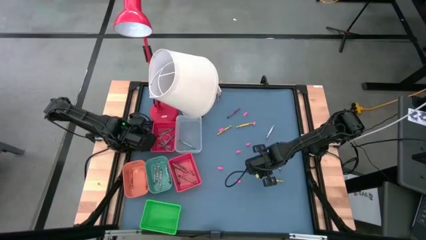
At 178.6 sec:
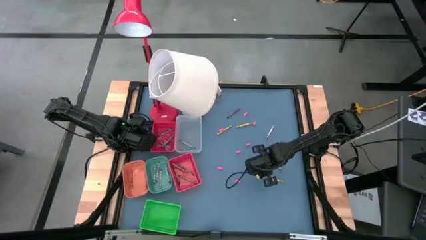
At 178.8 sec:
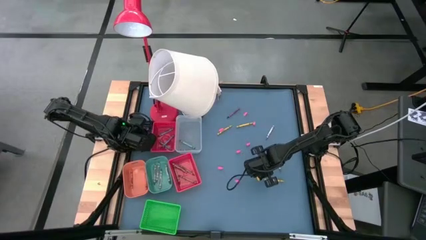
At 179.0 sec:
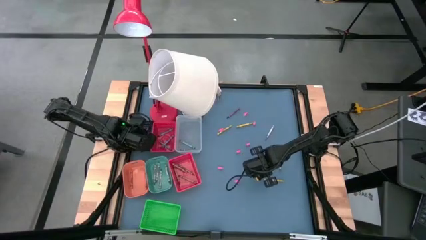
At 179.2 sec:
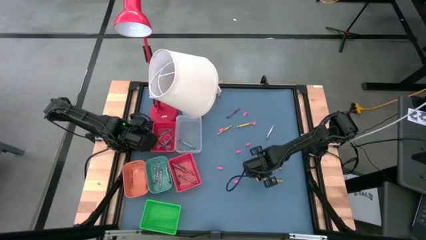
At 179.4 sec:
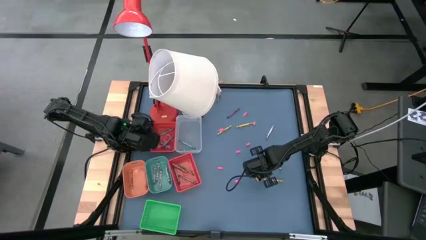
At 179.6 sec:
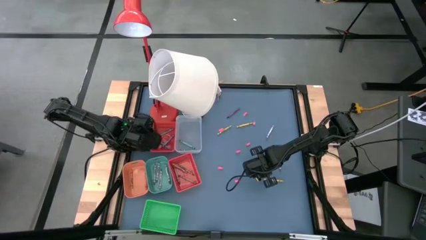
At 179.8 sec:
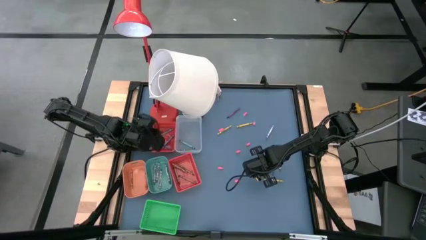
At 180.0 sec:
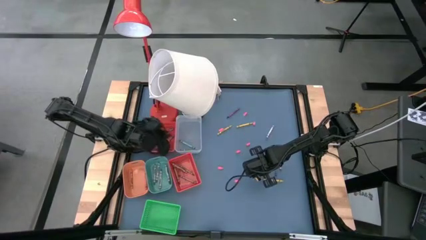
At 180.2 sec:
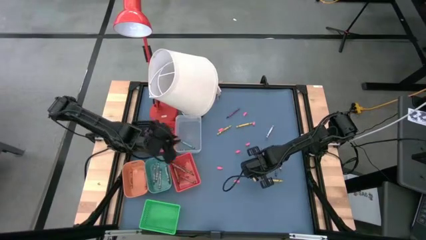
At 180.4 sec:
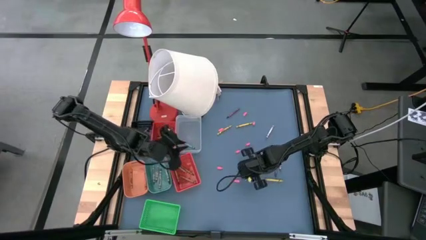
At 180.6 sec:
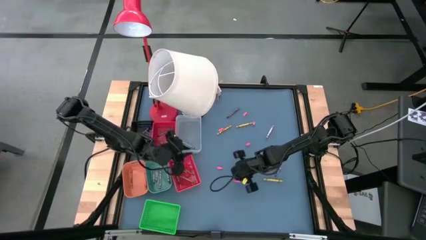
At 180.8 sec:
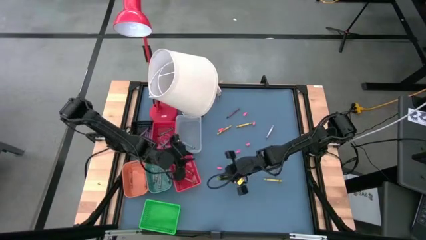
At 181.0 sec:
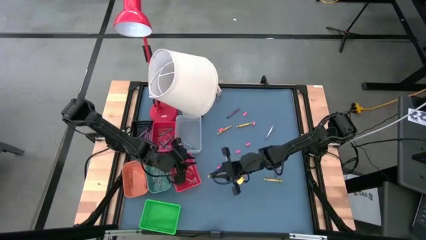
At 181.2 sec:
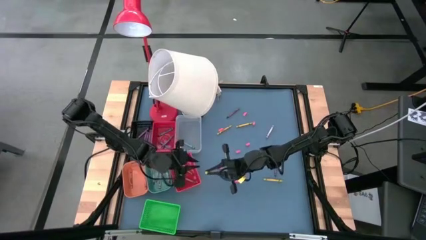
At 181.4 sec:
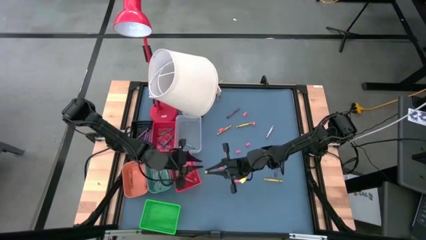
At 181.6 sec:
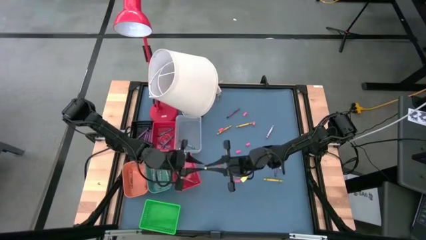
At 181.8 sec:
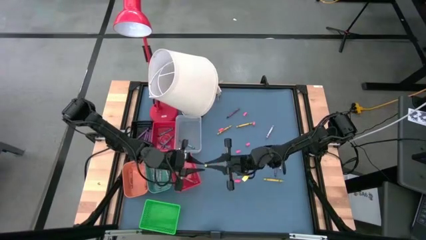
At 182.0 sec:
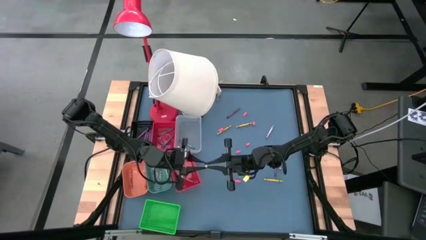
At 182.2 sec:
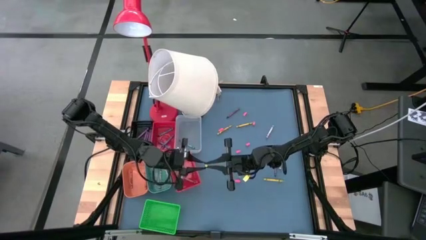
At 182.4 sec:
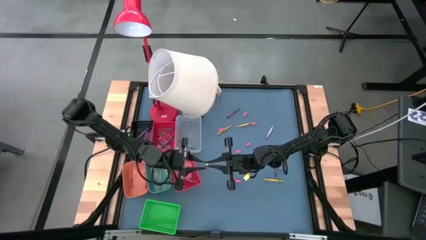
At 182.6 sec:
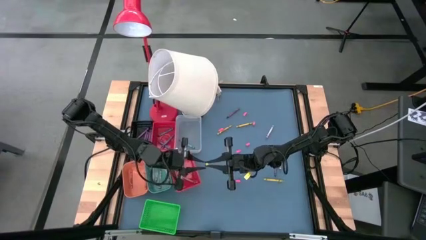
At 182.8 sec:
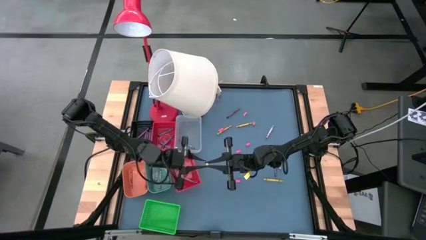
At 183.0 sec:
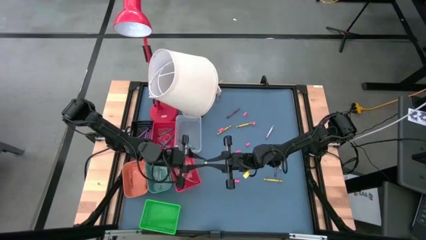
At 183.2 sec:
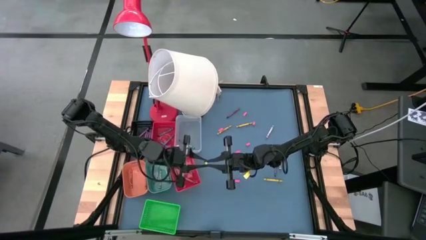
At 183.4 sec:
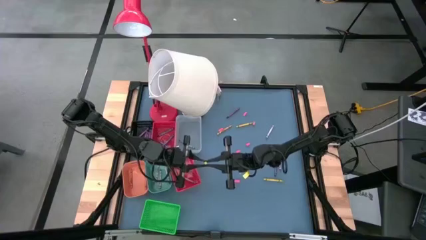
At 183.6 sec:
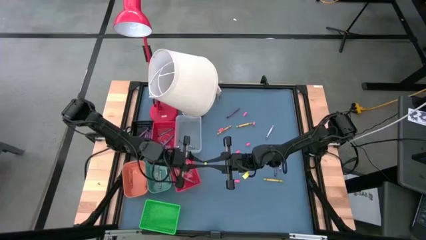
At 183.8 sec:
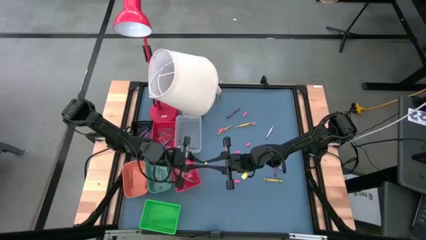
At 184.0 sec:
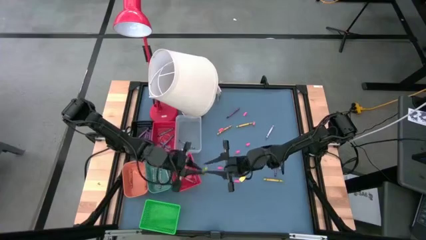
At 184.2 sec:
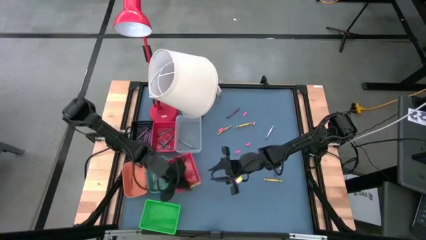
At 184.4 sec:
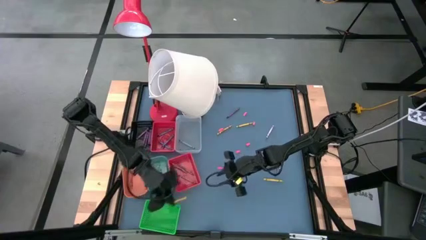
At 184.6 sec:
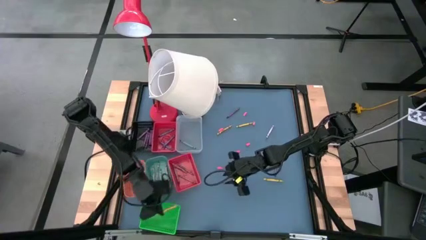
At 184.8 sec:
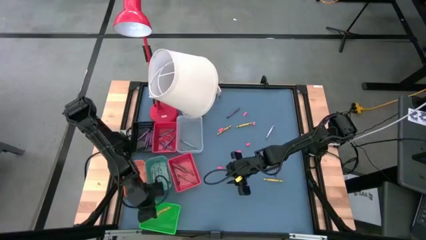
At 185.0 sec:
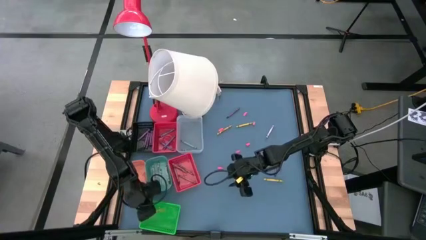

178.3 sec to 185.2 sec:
Task: Sort crayons
Put the yellow crayon into the green bin

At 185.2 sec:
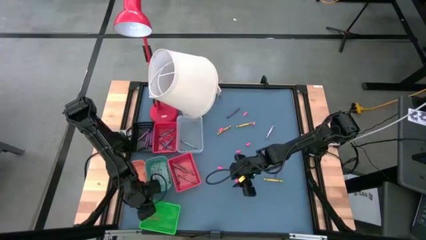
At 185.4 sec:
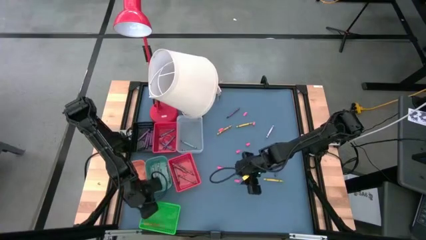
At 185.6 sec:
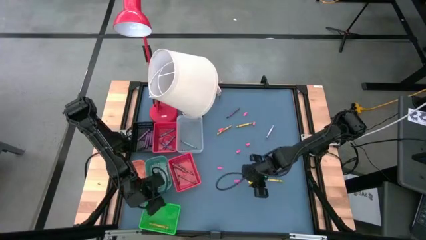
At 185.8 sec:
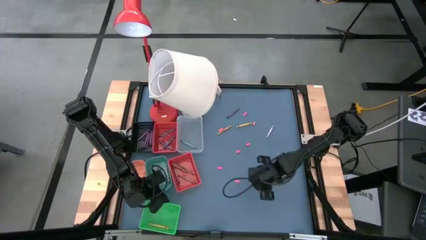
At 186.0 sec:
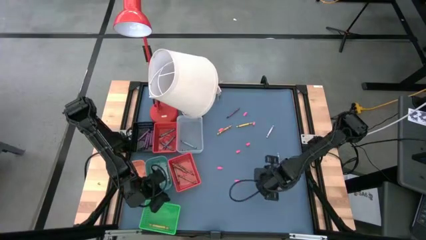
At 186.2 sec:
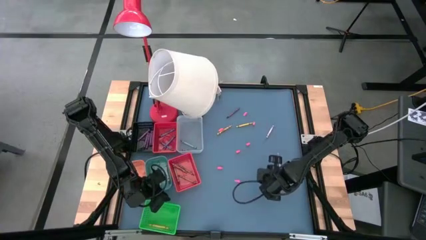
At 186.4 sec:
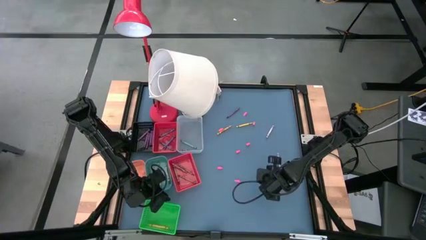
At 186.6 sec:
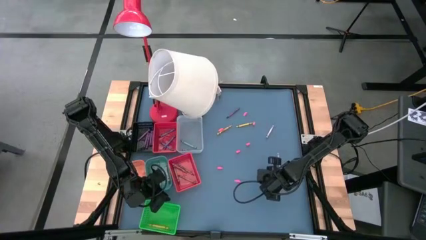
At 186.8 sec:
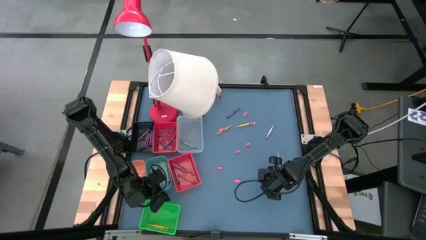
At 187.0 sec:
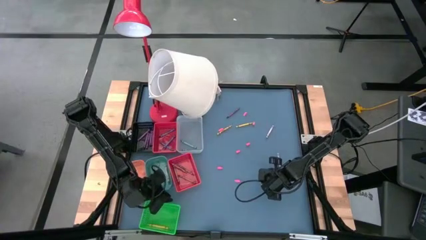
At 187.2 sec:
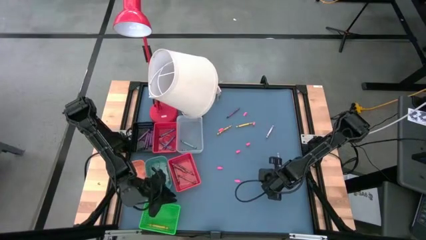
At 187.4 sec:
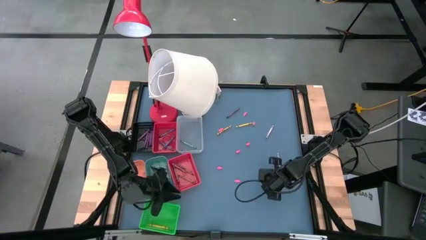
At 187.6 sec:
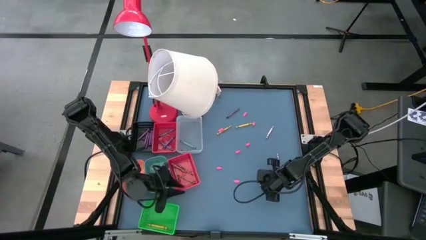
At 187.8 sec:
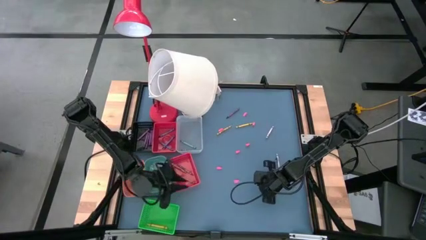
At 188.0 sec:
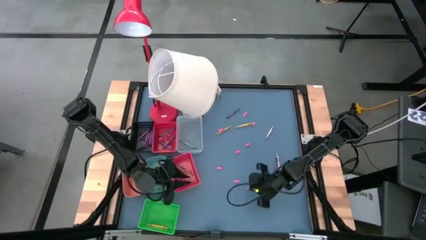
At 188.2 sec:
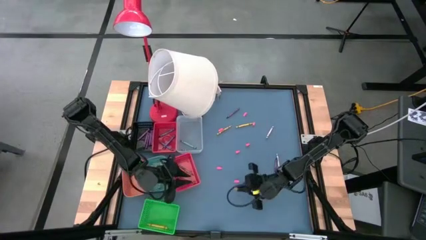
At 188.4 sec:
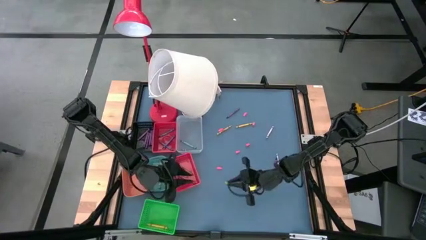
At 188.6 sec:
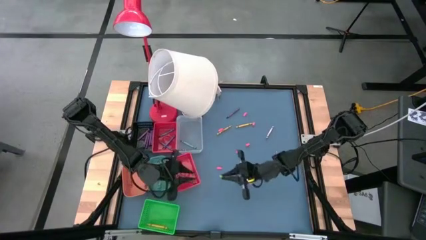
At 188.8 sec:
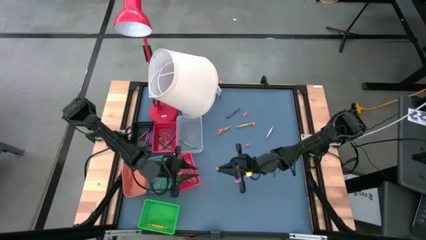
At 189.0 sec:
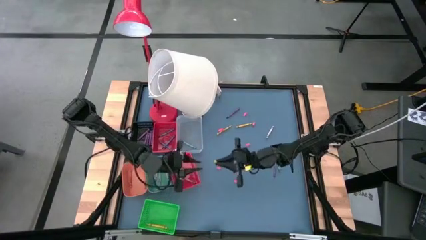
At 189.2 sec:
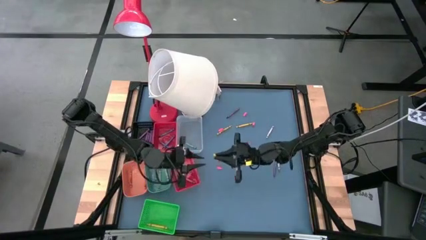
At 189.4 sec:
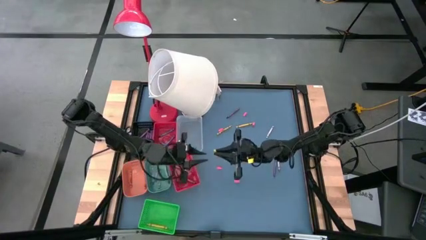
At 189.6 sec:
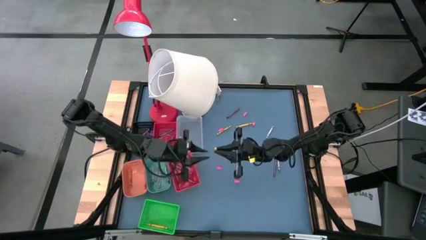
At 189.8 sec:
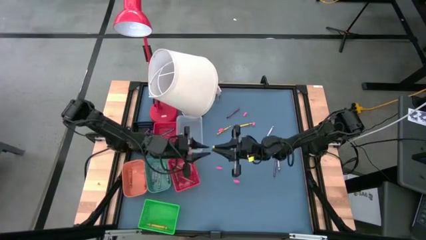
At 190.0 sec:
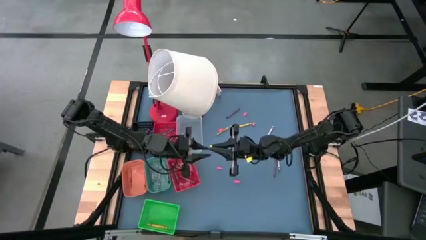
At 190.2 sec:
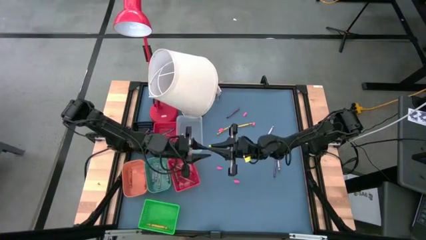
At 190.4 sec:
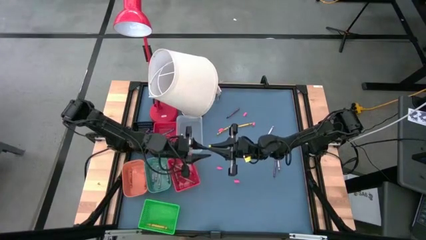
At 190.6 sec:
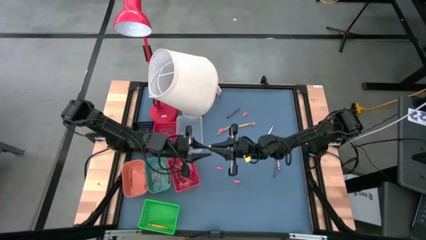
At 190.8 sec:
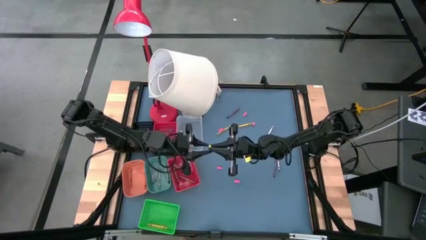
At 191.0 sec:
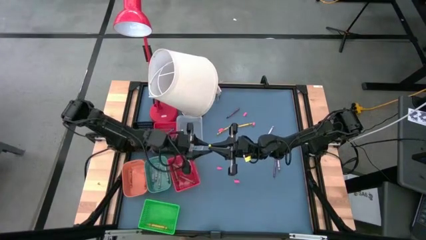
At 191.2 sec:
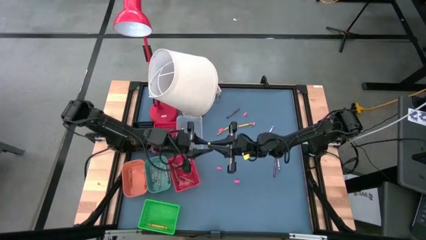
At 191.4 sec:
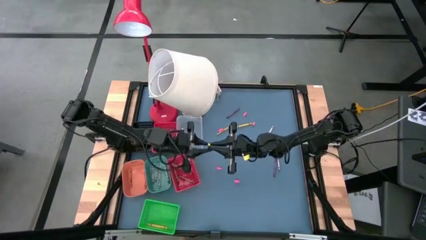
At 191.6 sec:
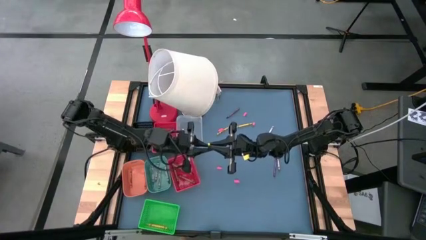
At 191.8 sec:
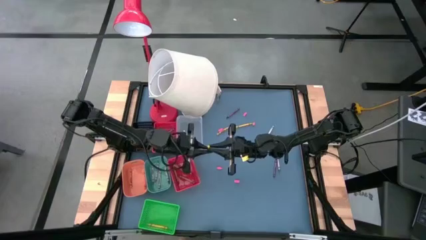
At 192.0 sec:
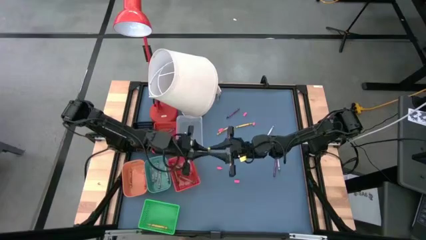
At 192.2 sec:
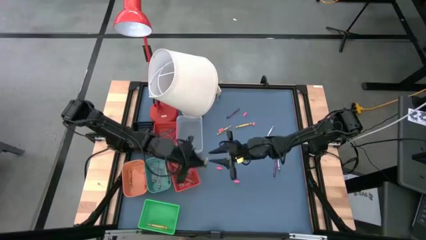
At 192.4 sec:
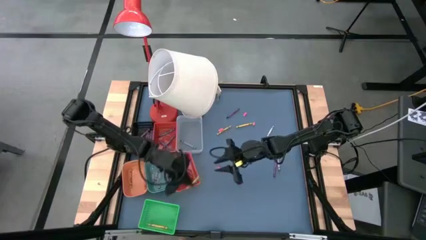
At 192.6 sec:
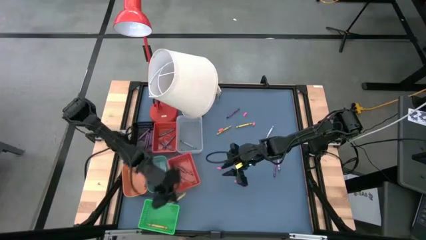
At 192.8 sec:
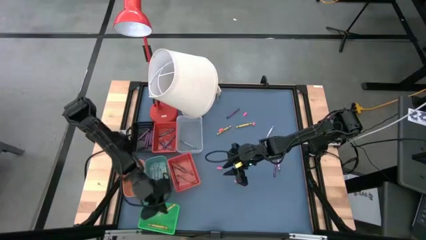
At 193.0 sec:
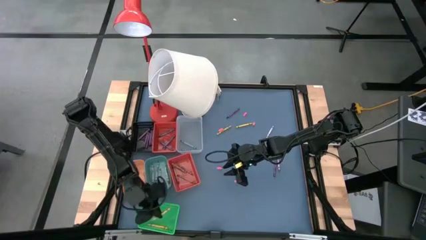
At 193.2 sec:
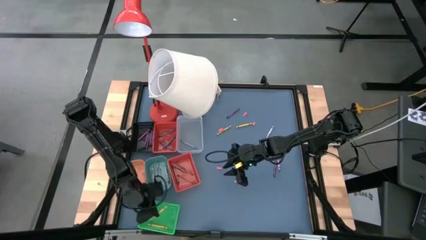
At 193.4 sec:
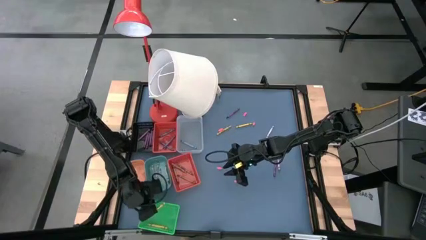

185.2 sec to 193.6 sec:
Put the yellow crayon into the green bin
